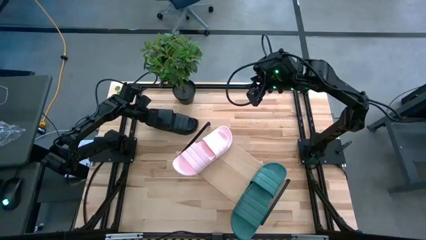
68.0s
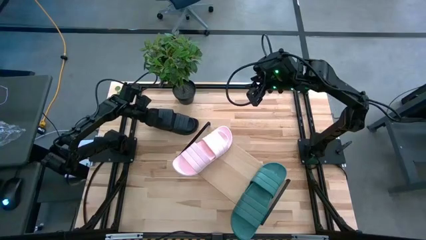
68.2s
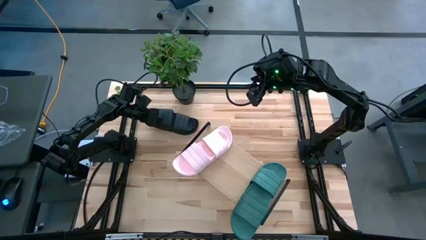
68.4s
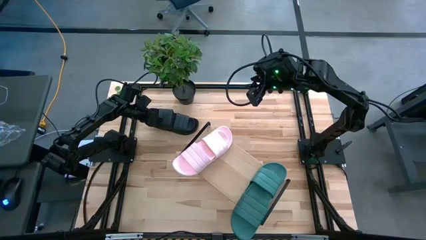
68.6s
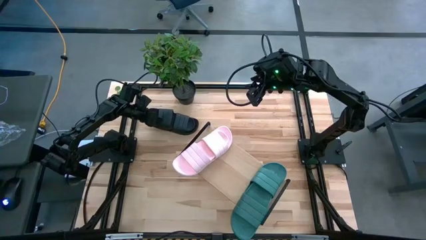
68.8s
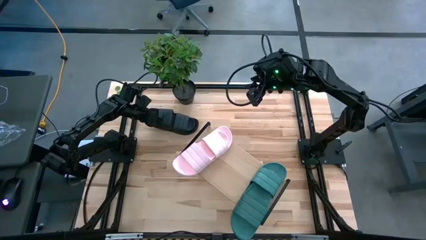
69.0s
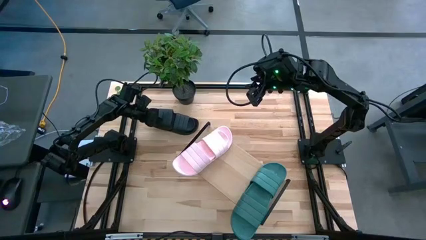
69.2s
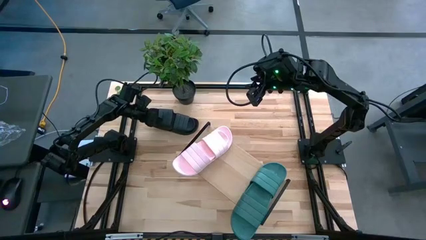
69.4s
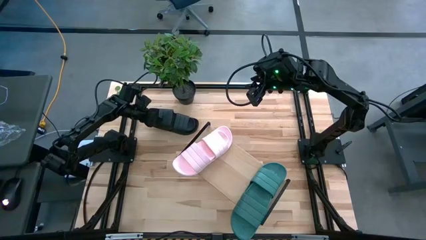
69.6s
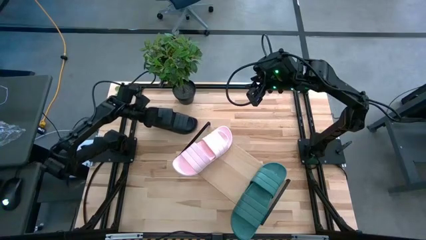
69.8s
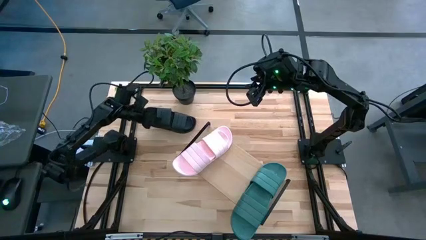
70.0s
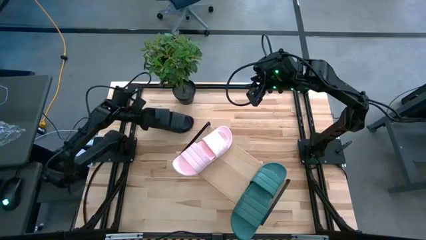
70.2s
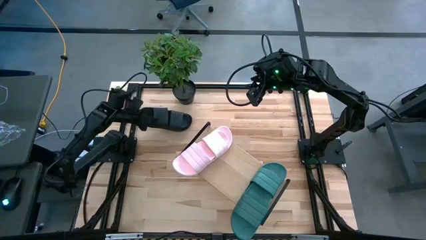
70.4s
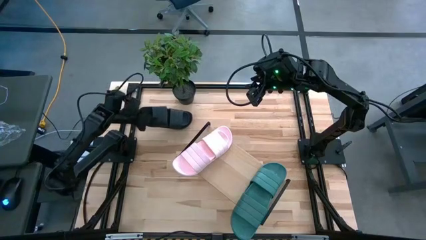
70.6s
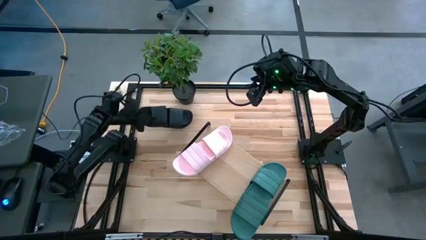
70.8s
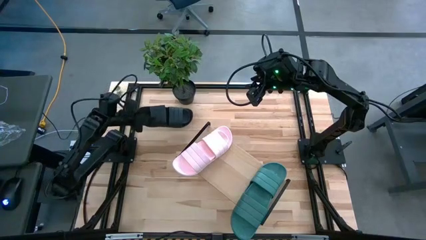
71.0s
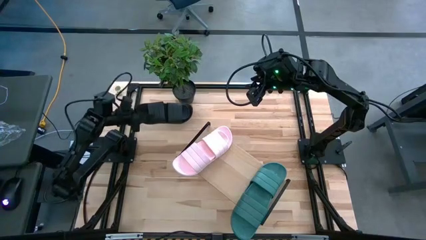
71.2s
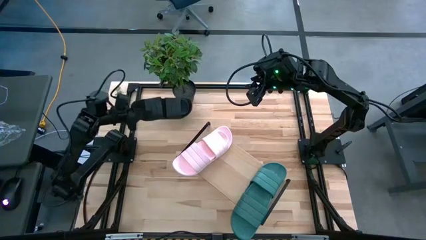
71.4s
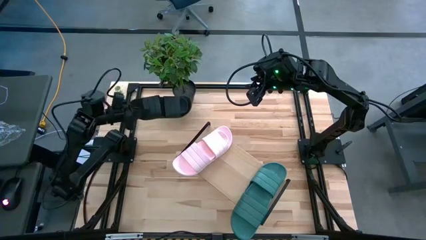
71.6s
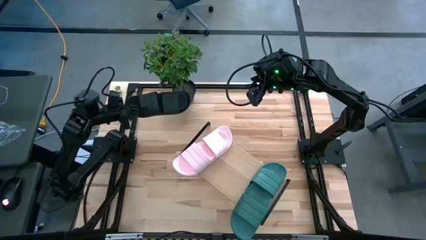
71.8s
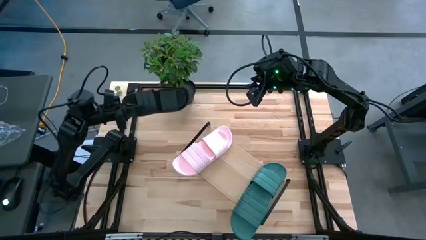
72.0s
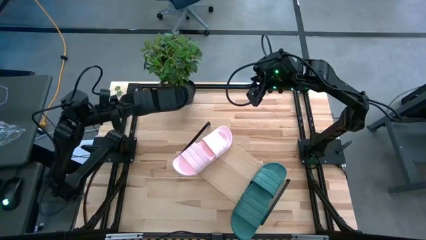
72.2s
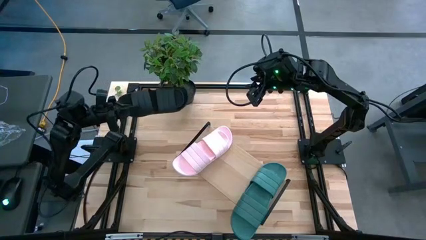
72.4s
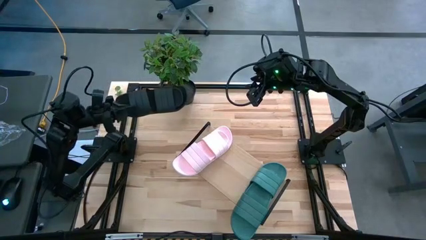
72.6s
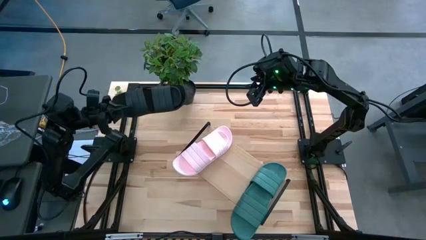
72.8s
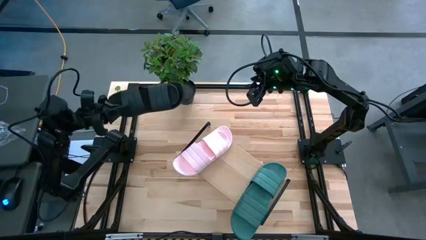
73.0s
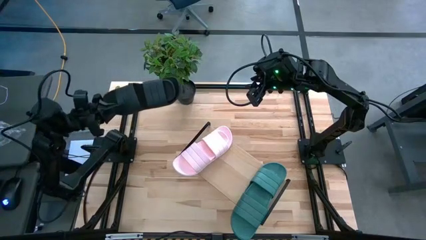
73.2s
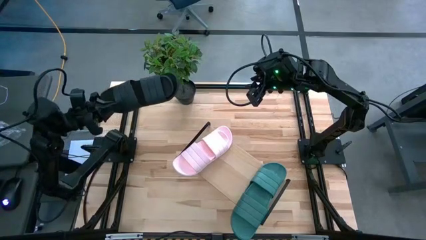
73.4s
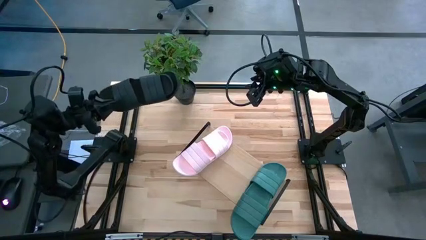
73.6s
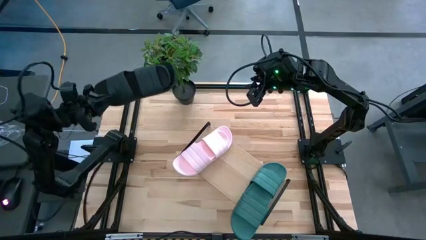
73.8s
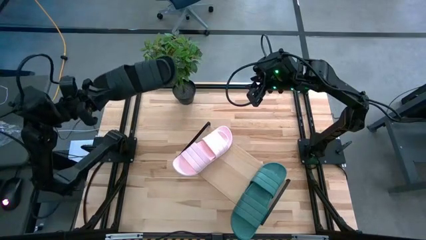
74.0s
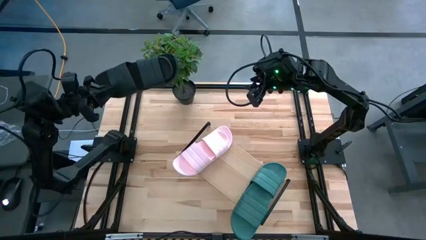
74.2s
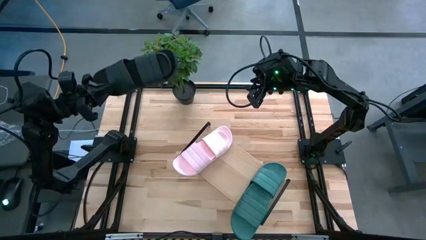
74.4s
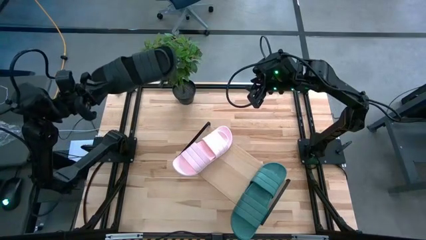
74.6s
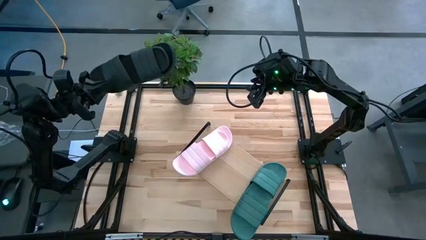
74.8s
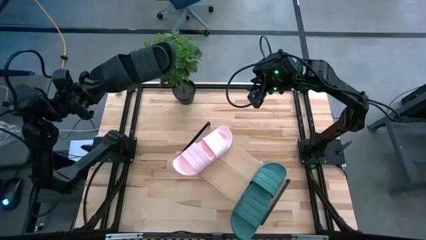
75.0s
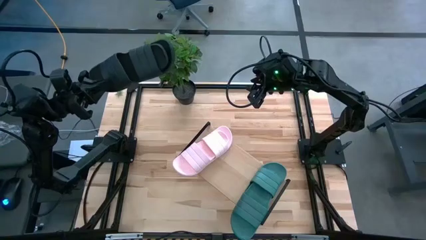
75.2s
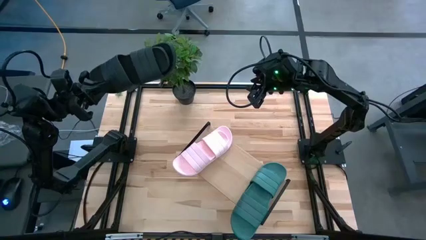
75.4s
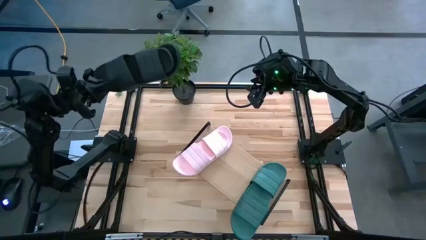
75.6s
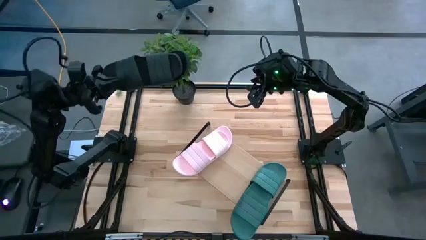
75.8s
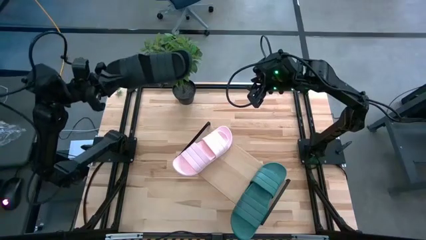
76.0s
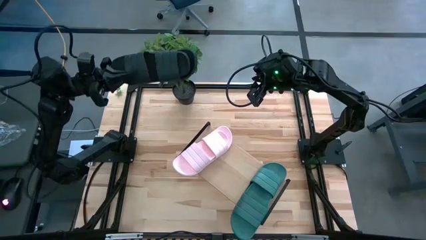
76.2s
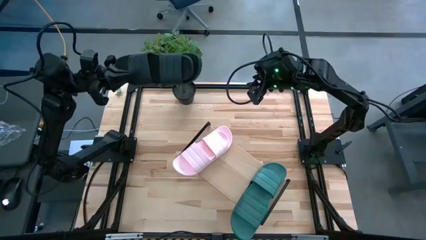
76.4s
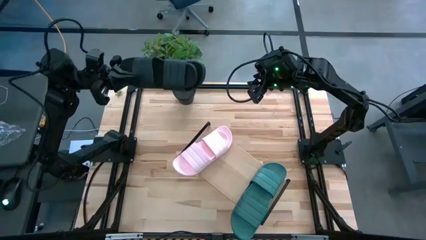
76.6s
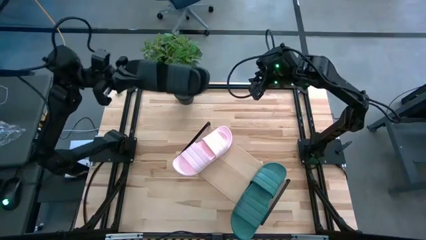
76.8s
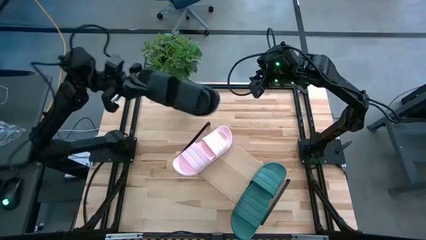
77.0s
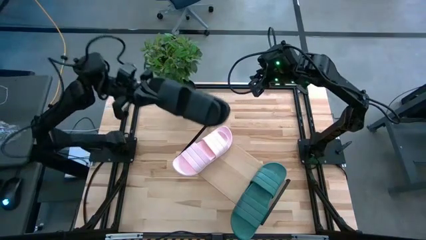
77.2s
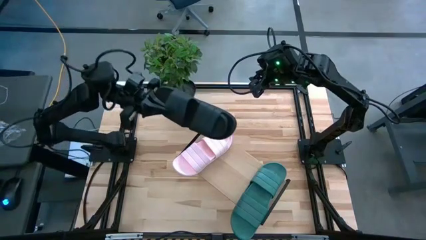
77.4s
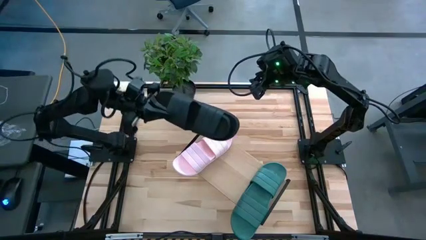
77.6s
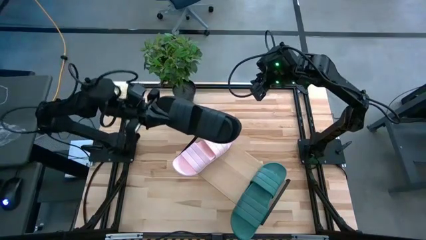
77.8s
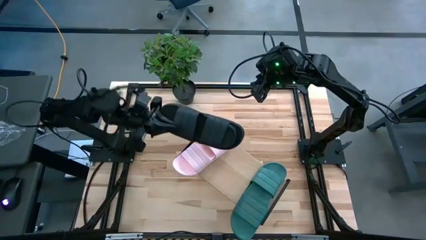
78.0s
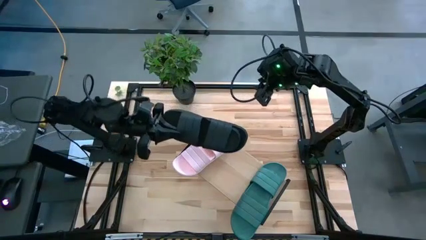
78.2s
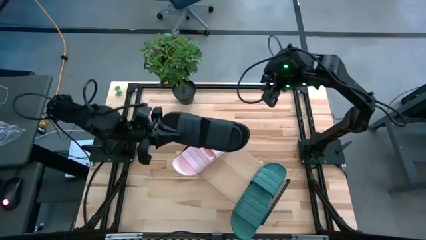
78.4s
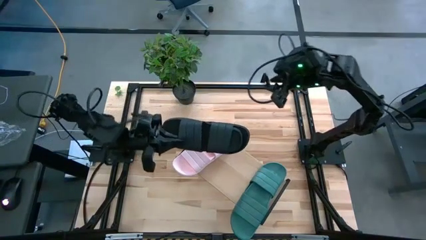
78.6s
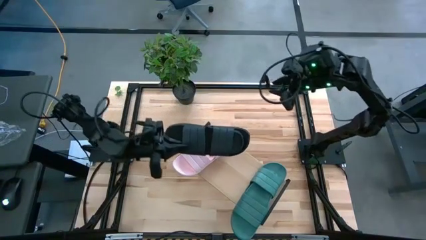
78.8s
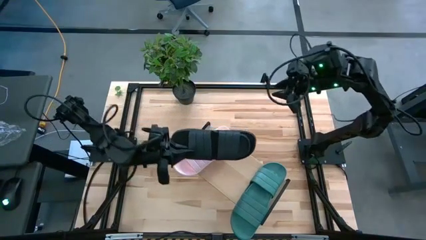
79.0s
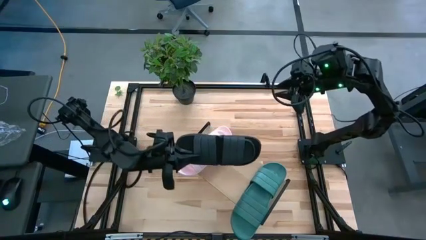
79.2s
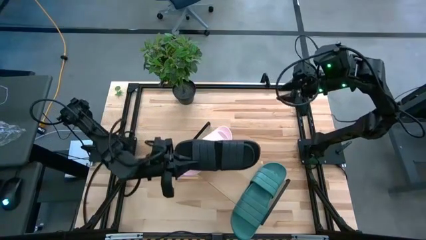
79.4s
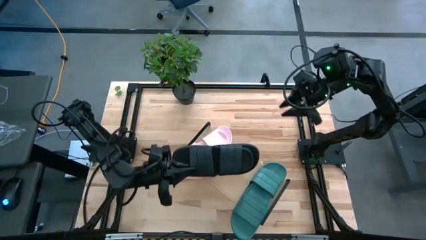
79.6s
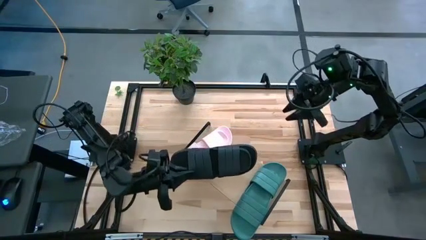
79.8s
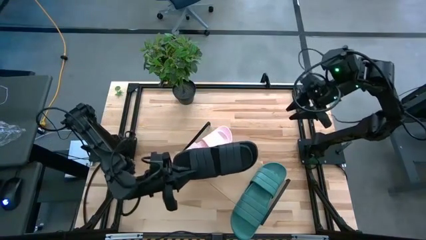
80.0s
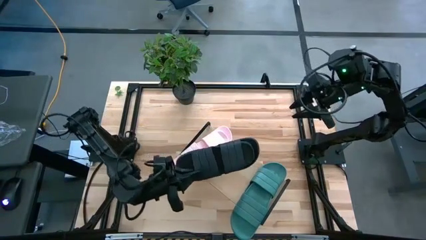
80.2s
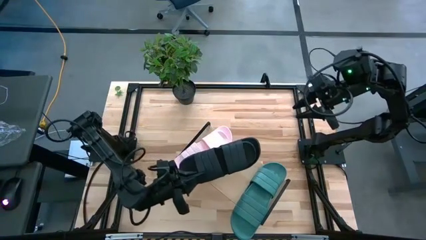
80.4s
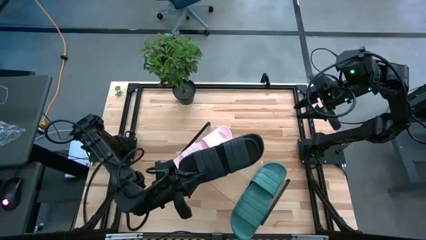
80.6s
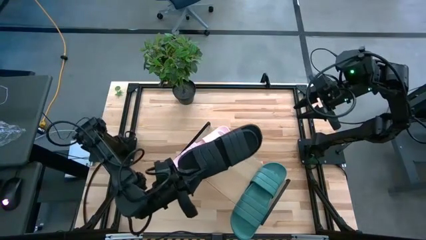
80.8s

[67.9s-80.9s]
Task: Pick and place slides into the shelf
Put the black pair of slides on the shelf

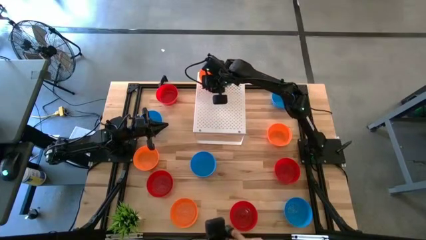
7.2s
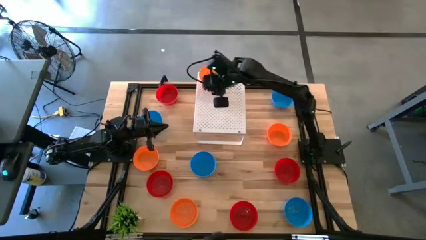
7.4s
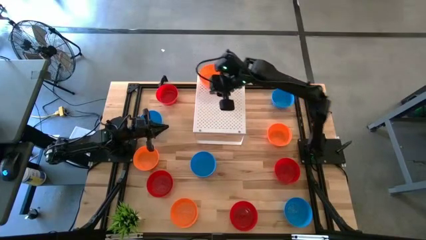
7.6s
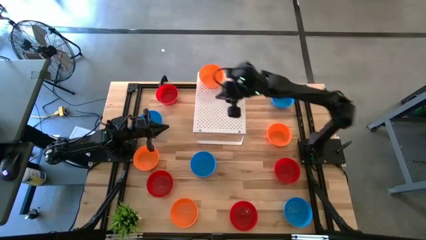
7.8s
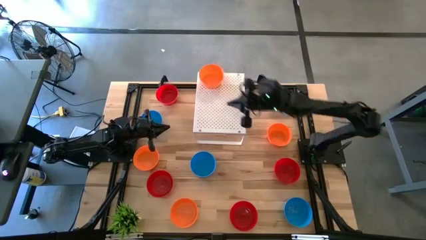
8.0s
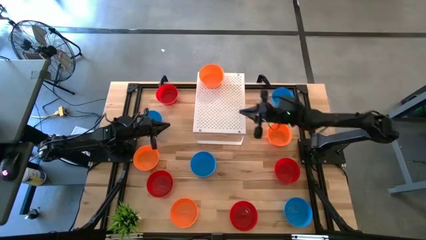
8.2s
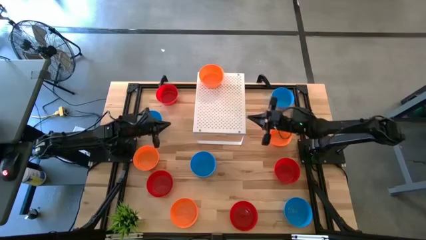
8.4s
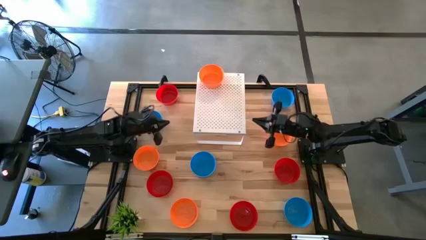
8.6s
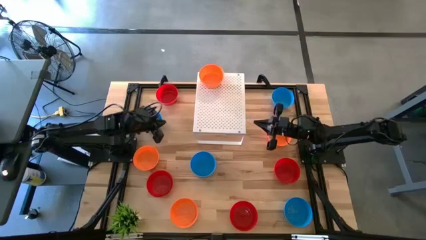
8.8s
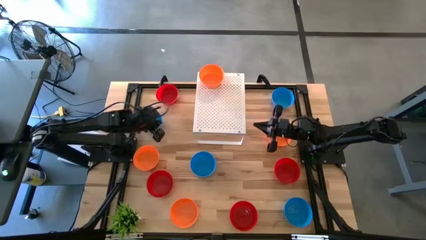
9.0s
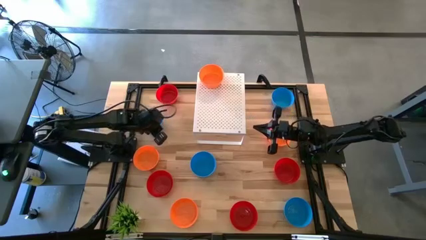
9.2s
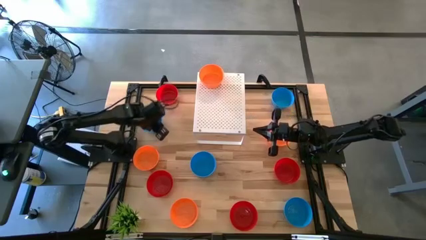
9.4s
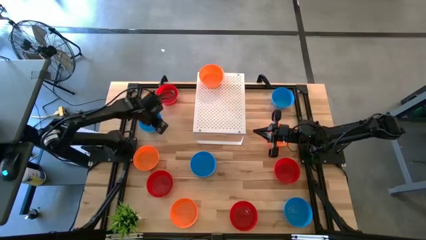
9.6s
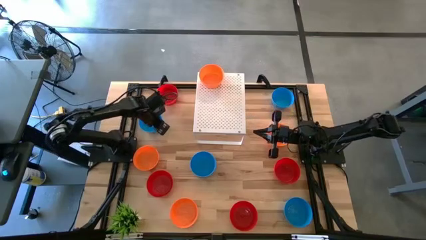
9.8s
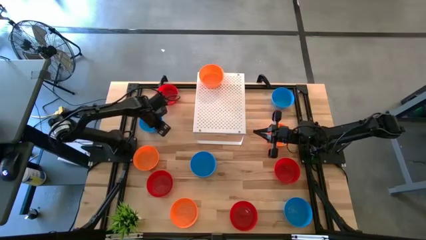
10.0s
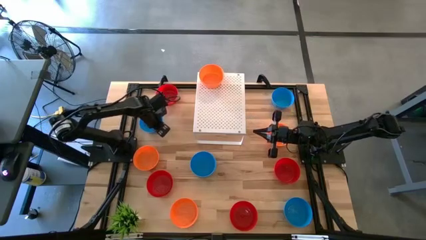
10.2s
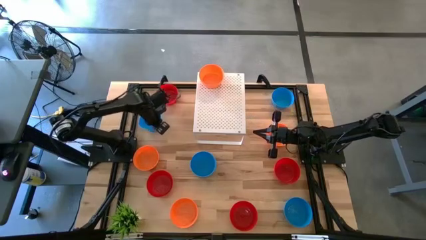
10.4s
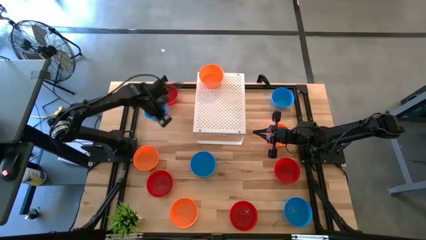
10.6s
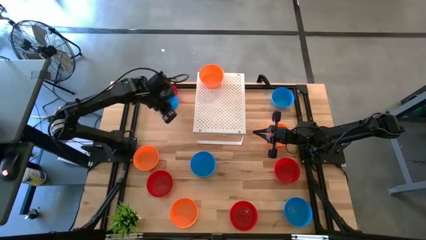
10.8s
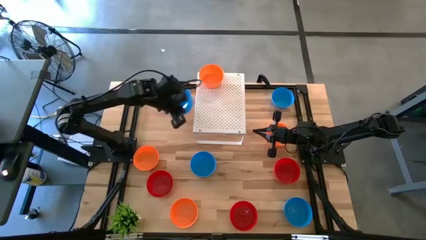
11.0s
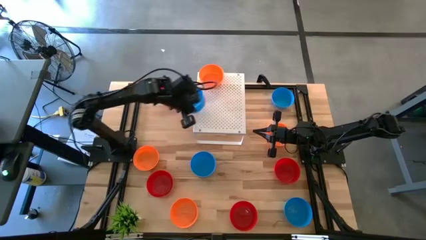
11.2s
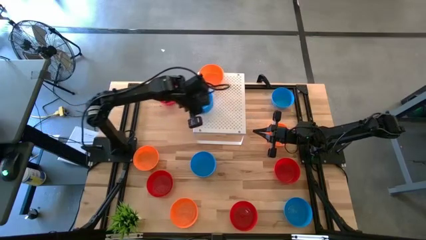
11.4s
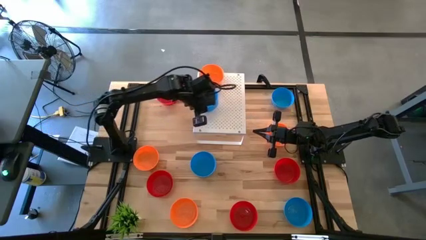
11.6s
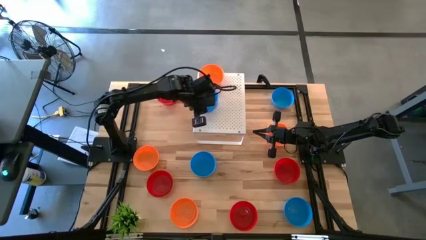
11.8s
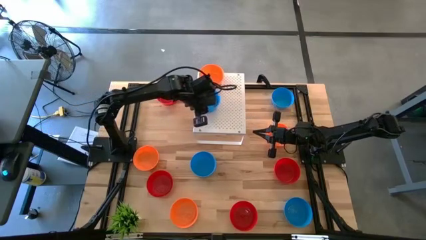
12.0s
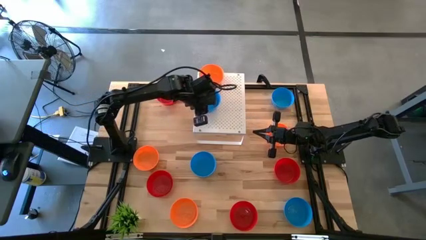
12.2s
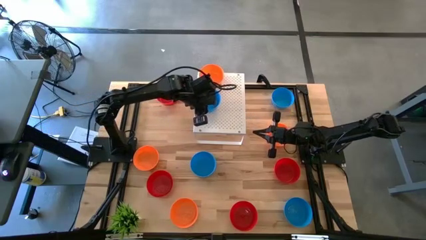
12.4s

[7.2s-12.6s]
Task: Pick & Place Mini bowls
Put the blue bowl on the shelf
